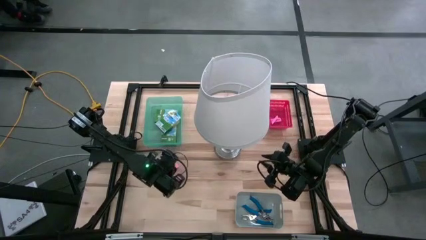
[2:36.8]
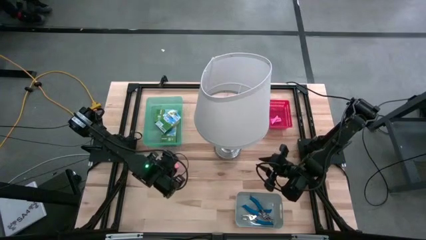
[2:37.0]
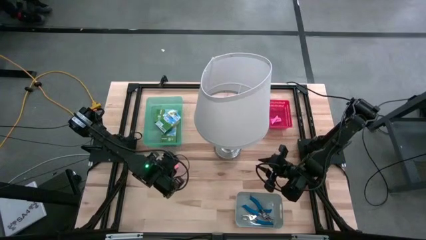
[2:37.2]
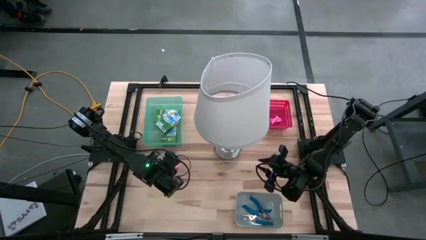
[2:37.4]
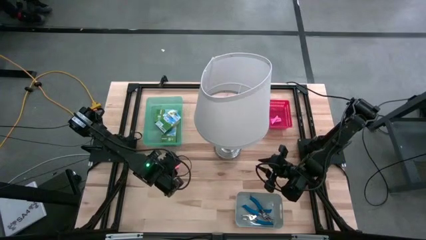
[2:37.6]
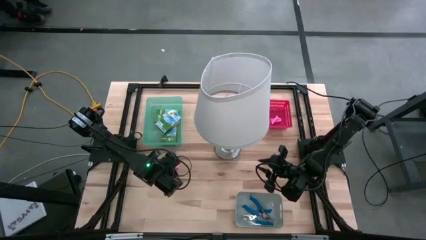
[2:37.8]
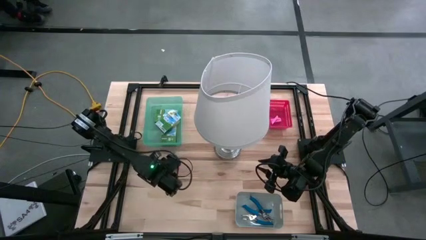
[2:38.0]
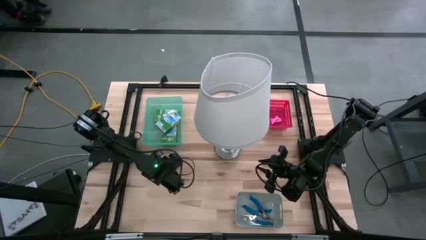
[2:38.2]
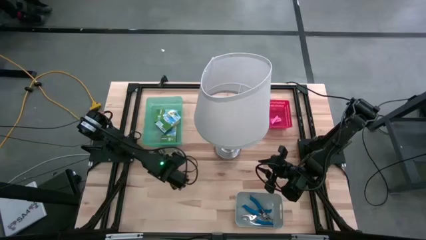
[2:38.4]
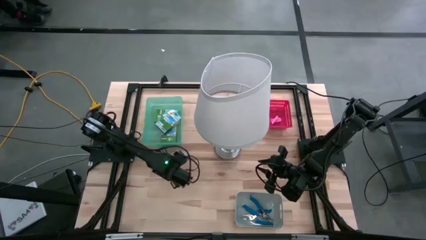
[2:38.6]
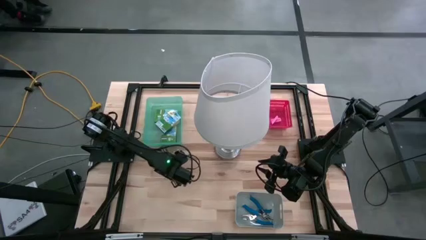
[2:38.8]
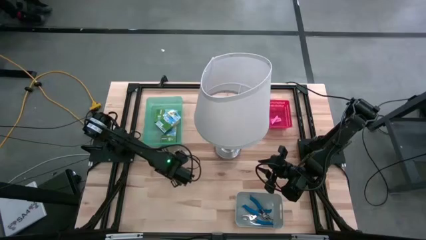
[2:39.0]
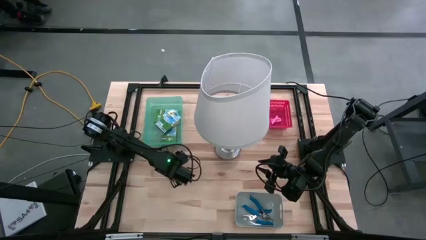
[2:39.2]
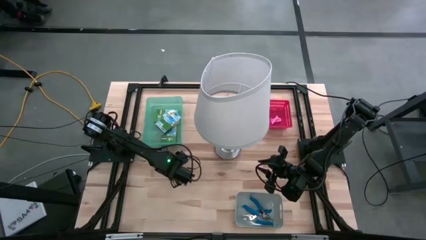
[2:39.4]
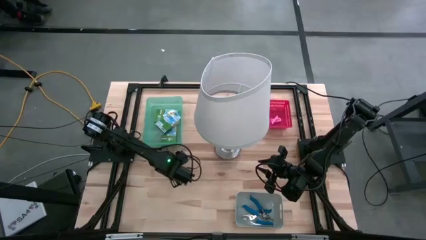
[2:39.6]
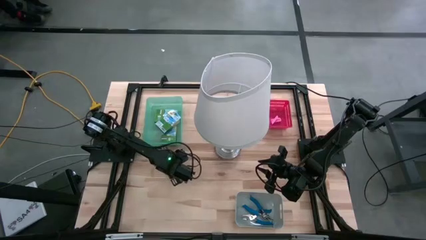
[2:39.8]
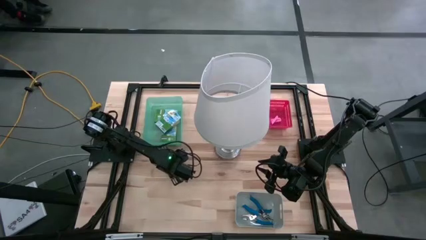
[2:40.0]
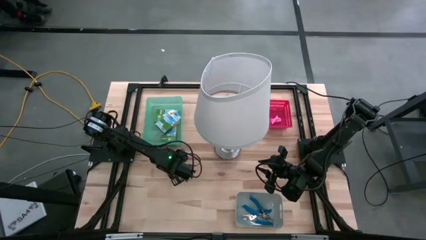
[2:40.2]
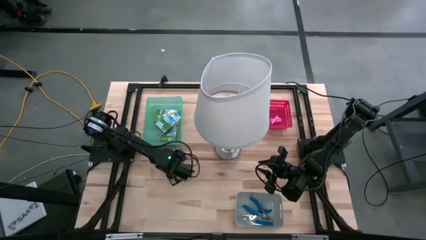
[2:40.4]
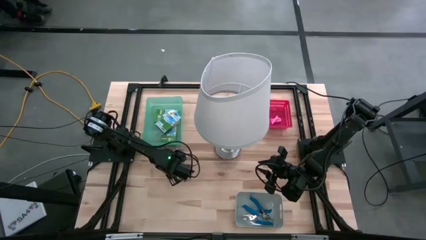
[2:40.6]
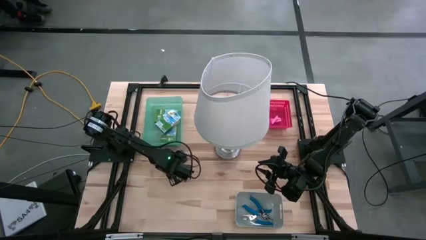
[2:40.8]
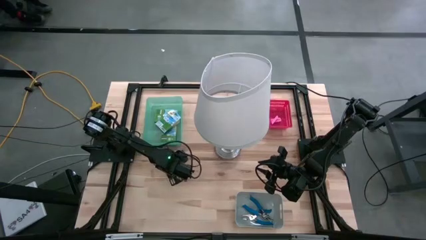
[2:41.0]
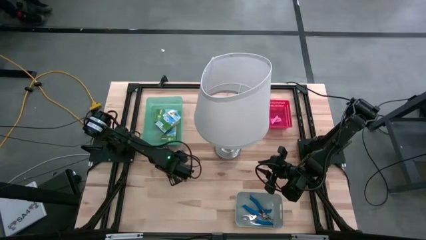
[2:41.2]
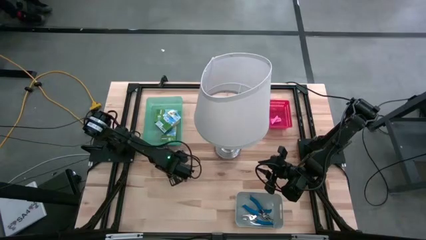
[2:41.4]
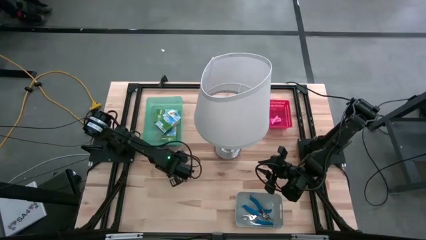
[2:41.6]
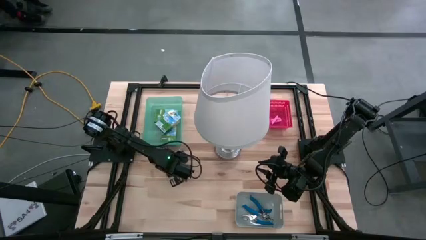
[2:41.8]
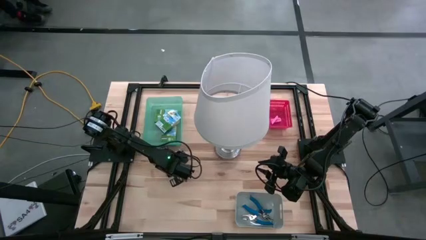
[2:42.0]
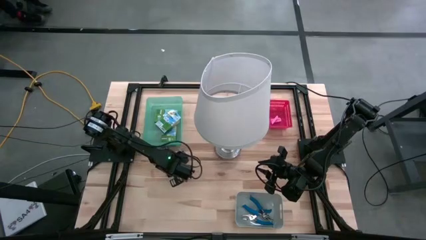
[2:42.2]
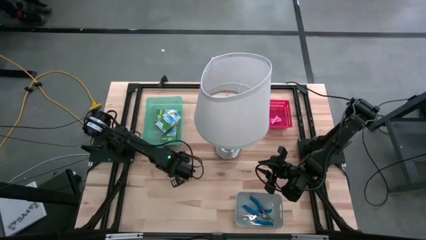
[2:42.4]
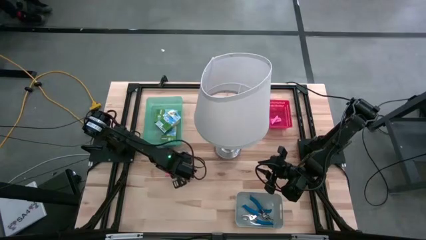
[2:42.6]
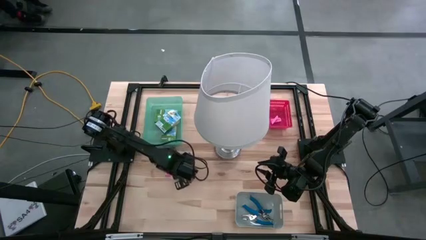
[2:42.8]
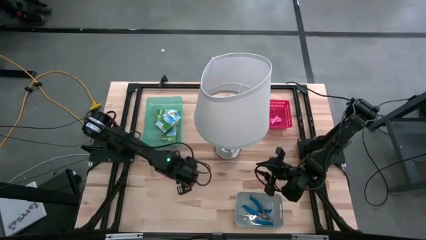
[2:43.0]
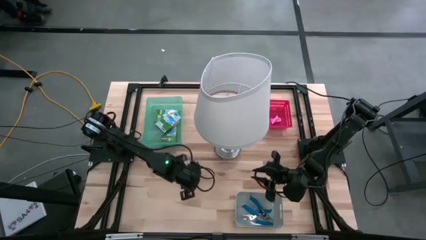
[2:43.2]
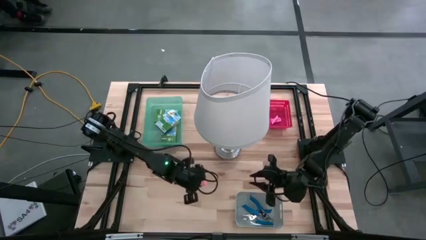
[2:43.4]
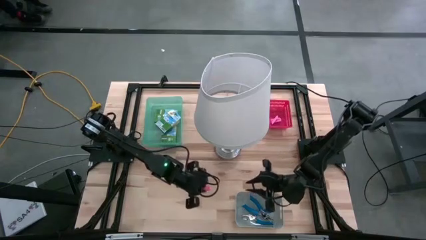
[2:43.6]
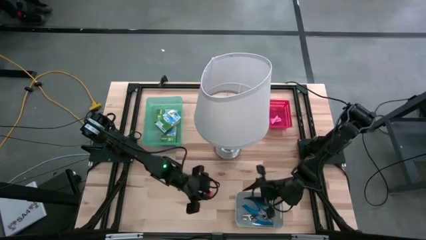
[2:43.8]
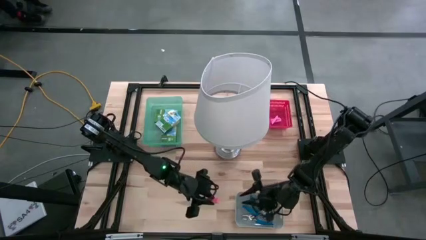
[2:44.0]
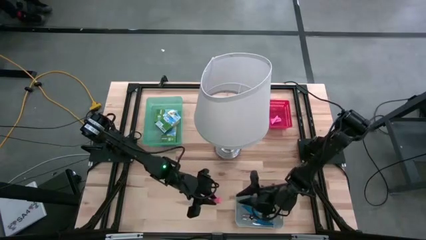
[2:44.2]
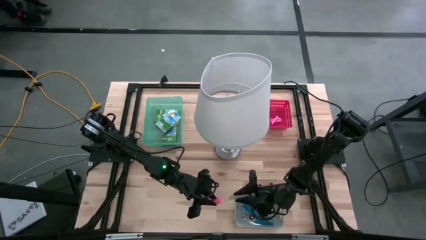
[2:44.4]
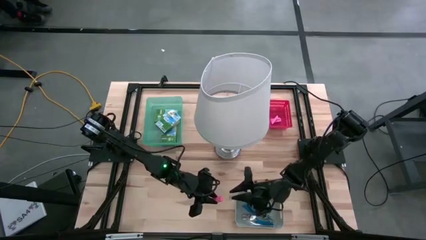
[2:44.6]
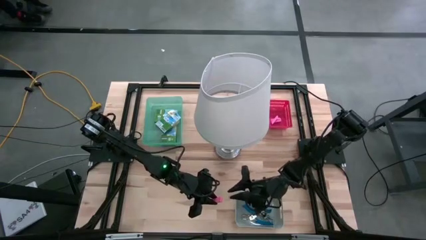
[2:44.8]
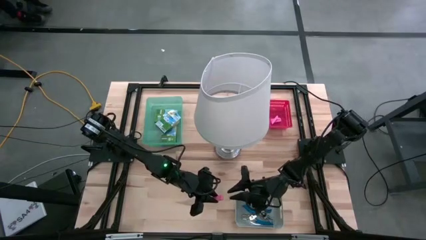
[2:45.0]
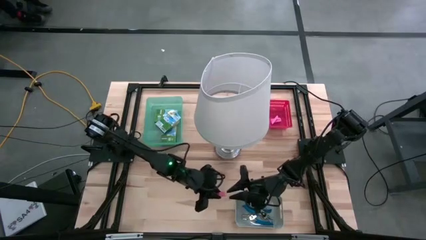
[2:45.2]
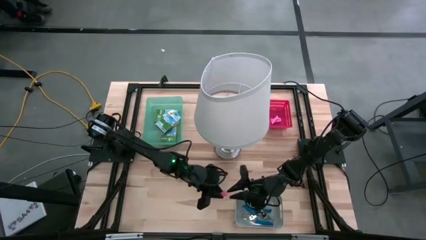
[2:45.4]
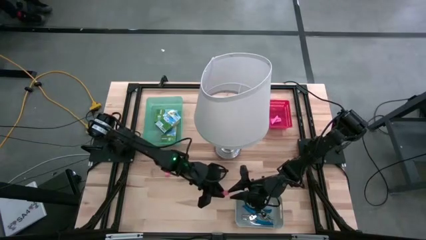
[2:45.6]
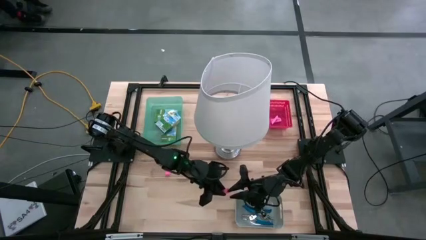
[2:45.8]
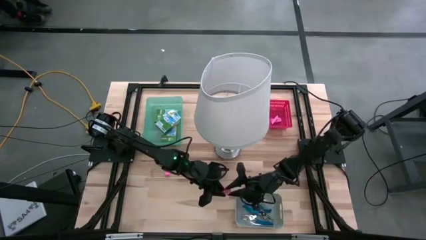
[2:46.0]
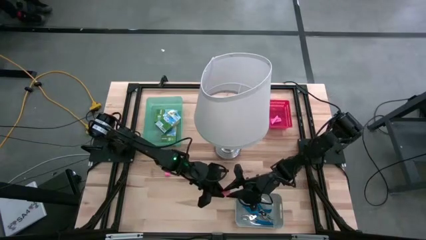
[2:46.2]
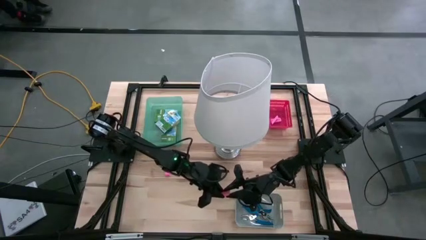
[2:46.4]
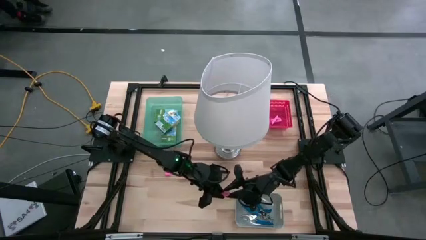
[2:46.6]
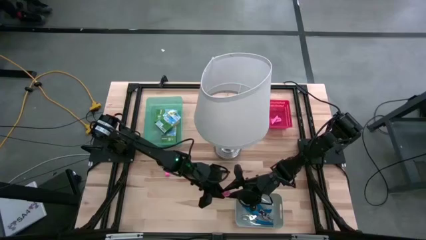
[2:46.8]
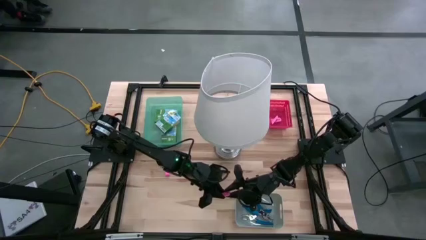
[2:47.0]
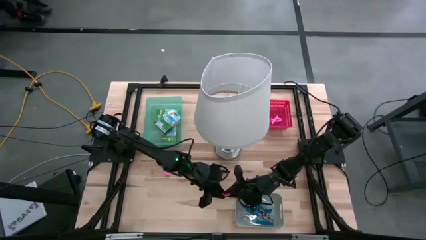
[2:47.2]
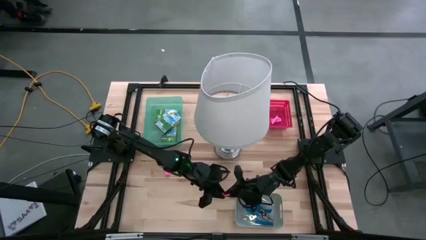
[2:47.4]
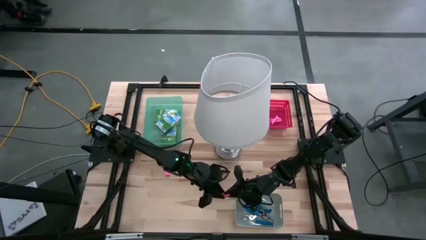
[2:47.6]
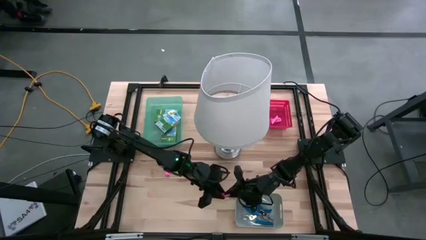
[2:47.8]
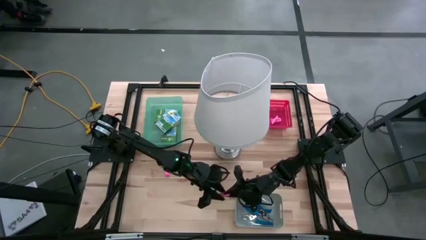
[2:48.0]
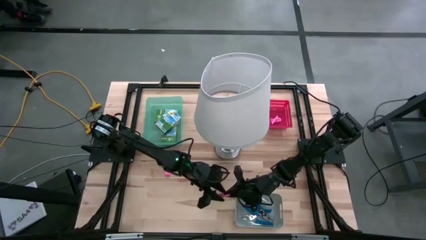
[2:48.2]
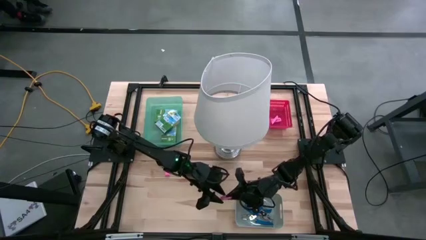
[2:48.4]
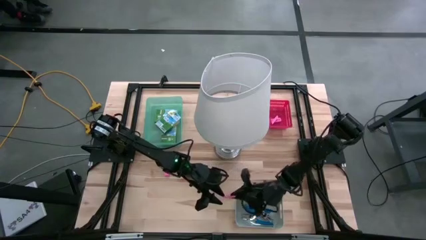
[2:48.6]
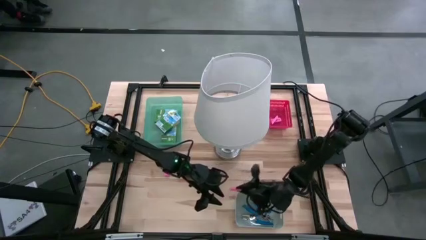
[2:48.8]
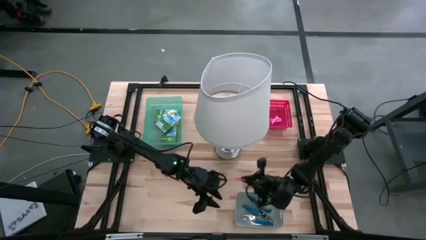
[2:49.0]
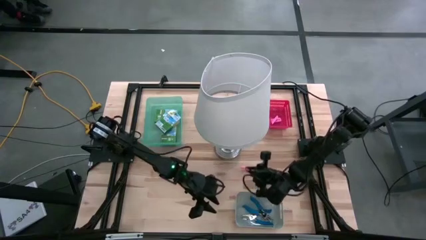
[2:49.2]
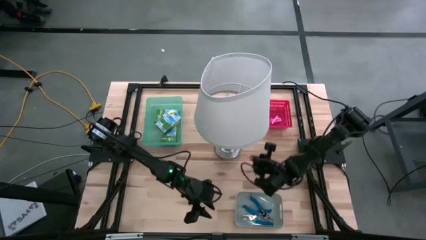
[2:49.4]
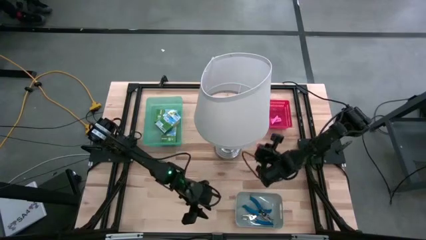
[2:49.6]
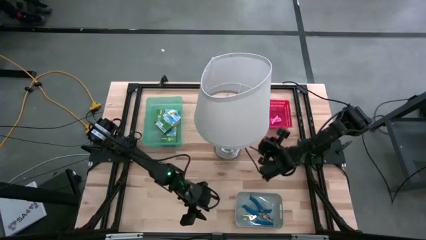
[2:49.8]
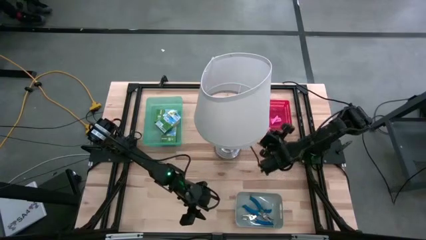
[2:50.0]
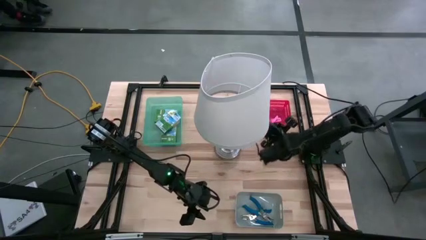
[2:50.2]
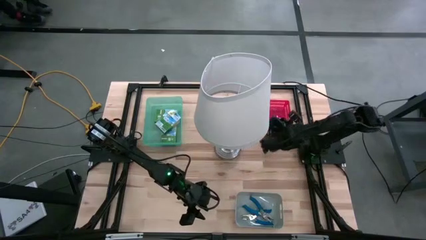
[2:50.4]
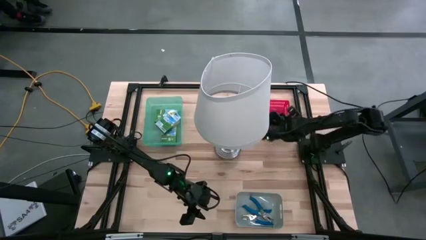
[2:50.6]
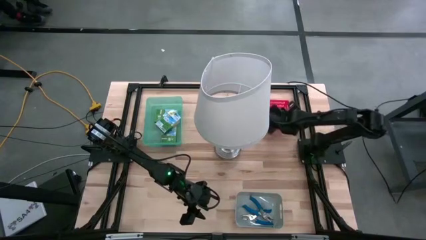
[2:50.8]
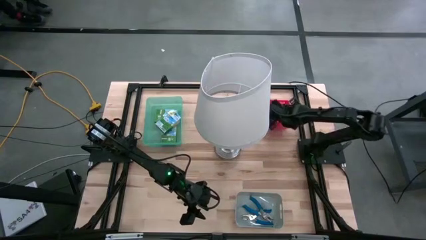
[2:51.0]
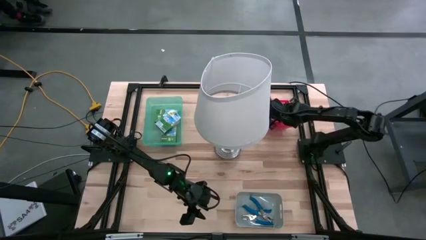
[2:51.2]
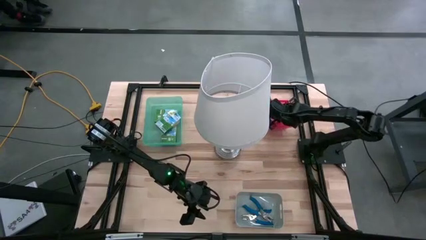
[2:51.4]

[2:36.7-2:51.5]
Task: Pick & Place School Supplies
Put the pink eraser into the red bin

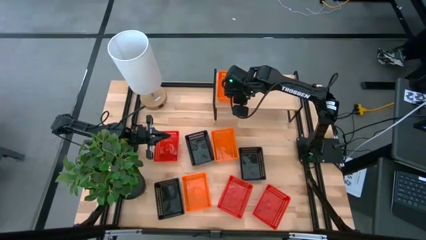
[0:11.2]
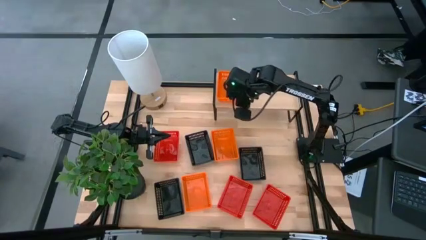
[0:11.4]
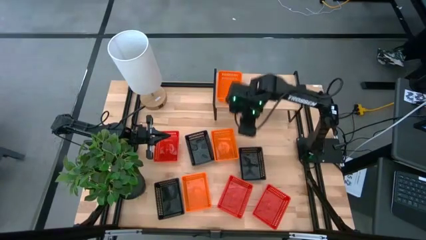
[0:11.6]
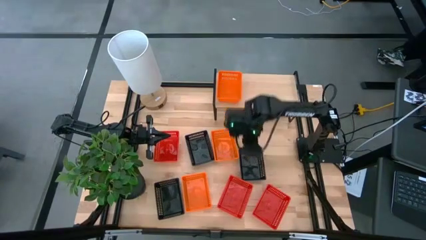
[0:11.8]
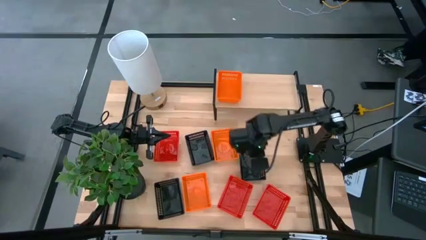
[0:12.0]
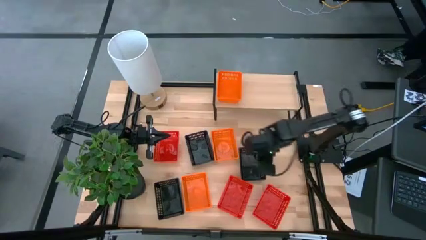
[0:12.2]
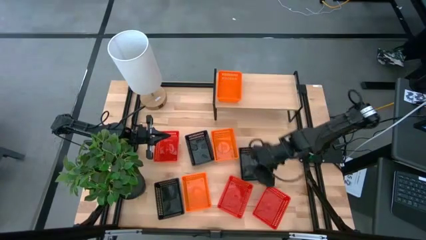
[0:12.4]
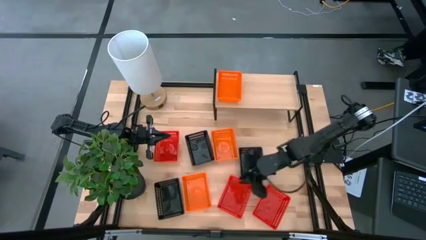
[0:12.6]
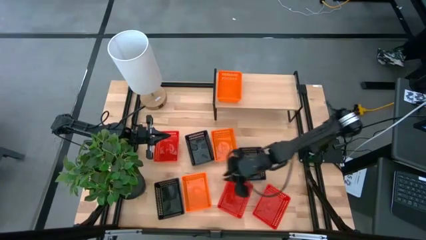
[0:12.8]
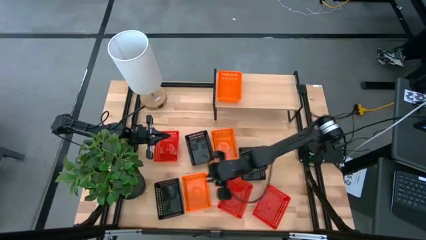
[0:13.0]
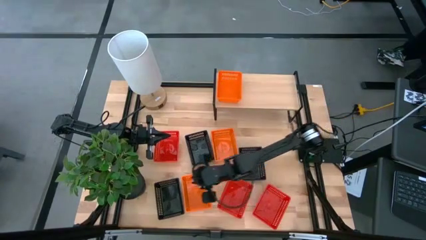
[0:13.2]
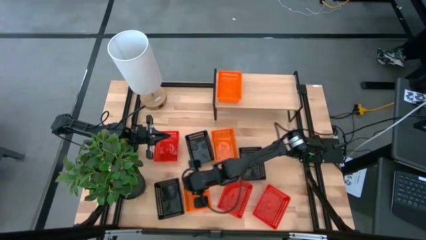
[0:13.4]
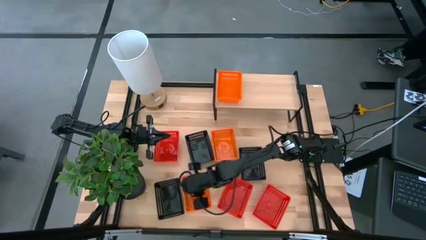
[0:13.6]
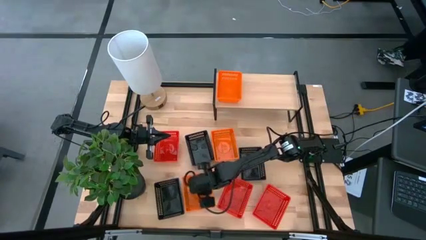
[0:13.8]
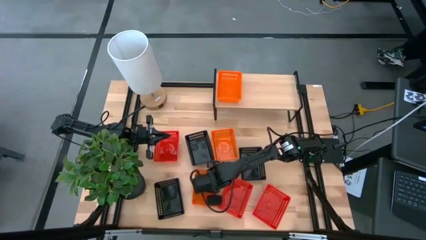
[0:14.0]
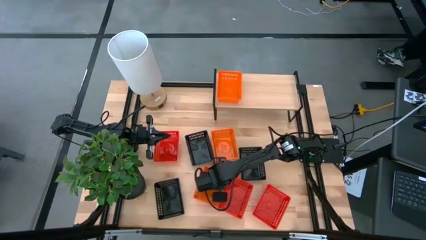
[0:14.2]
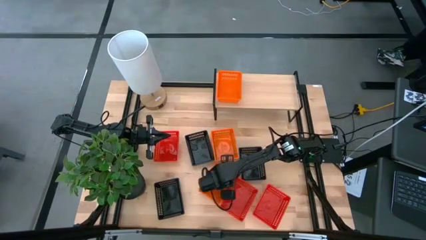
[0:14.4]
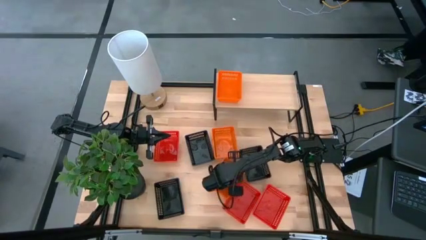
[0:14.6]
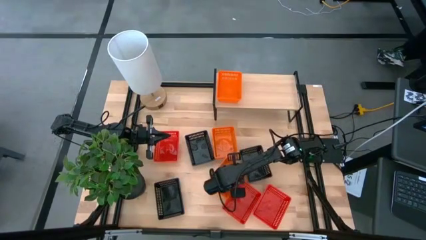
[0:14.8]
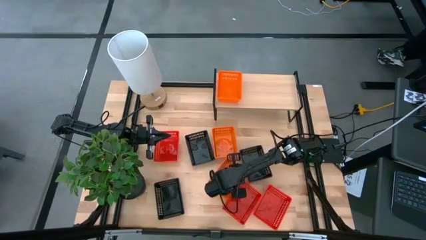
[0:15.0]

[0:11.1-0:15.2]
Task: Stack baskets on shelf by color
Adjust the bottom orange bin on the table
